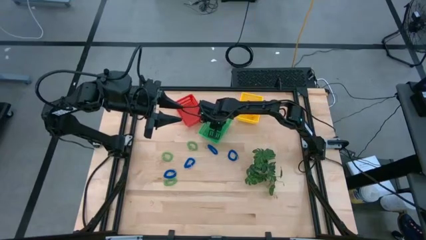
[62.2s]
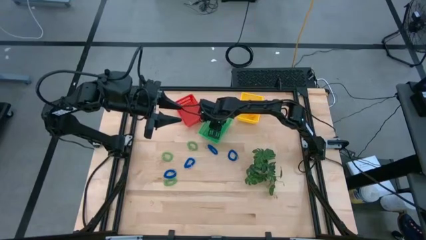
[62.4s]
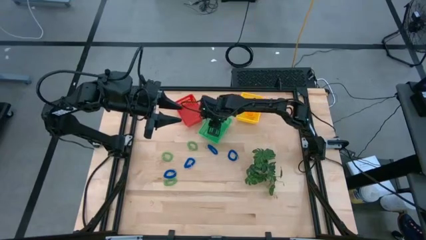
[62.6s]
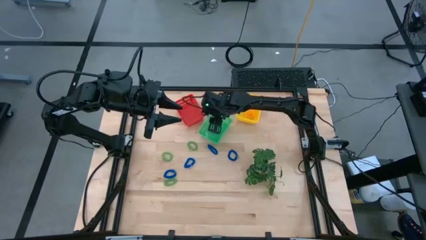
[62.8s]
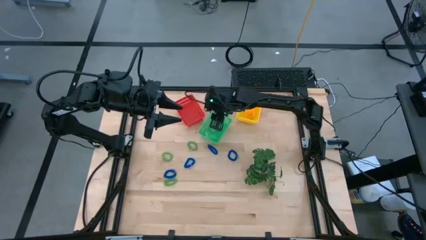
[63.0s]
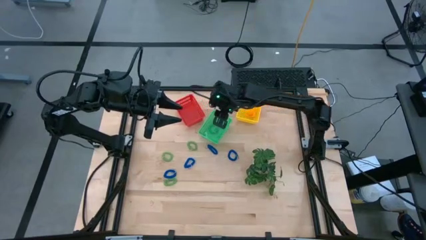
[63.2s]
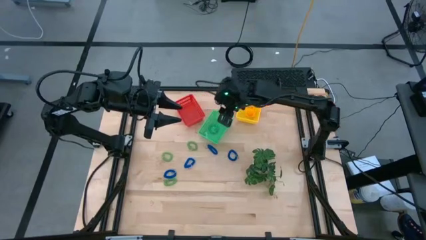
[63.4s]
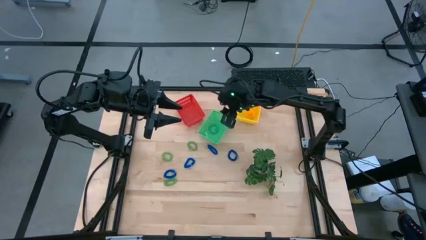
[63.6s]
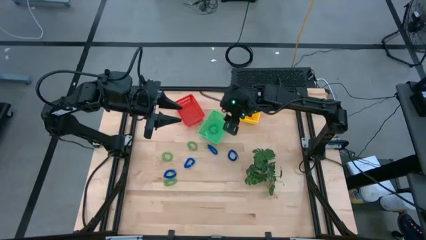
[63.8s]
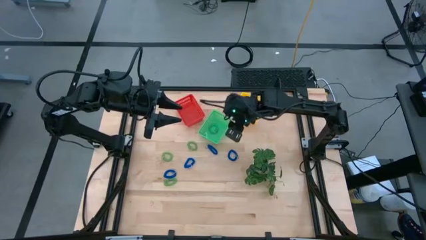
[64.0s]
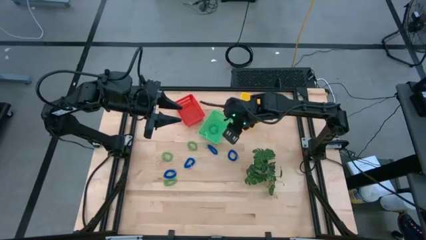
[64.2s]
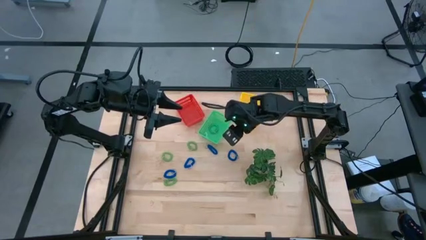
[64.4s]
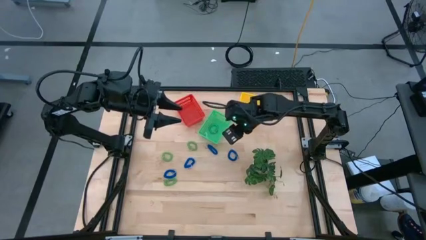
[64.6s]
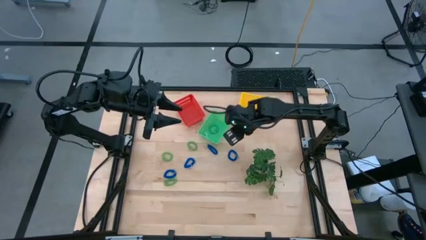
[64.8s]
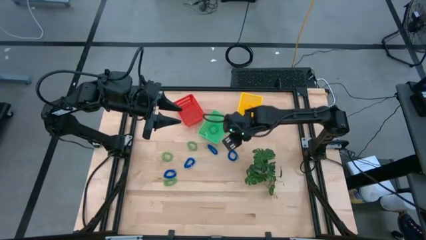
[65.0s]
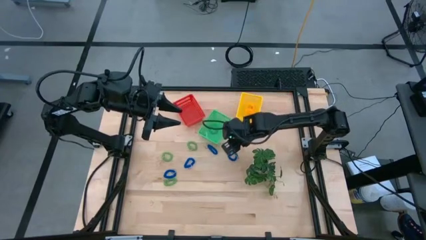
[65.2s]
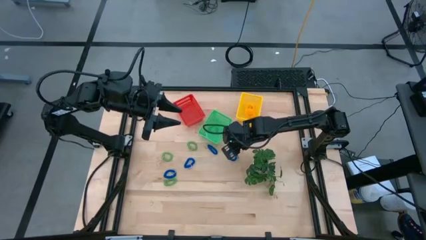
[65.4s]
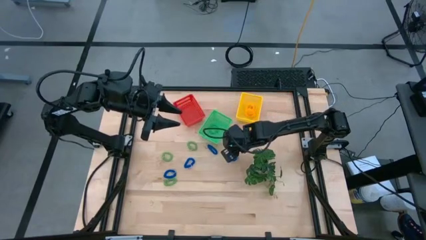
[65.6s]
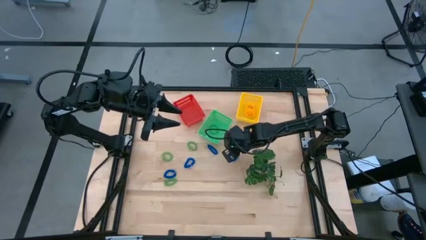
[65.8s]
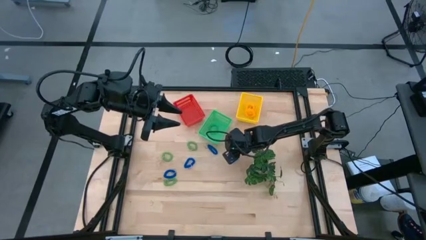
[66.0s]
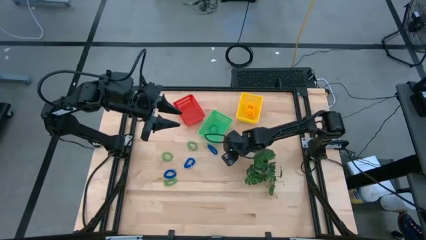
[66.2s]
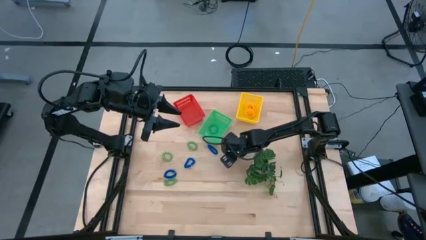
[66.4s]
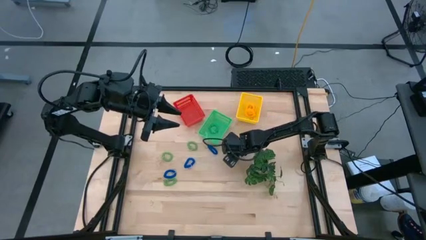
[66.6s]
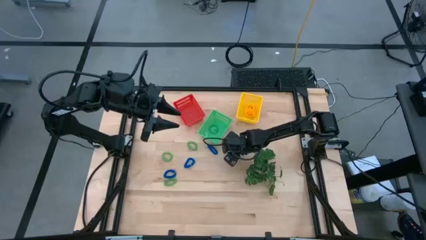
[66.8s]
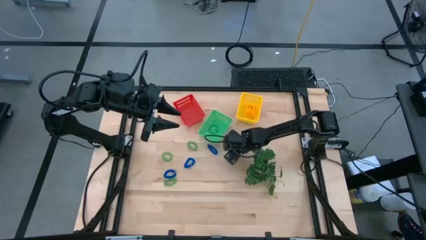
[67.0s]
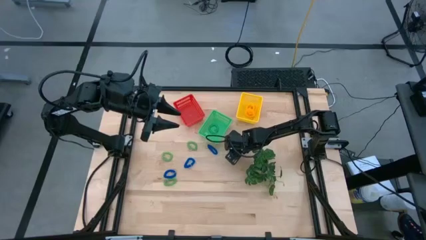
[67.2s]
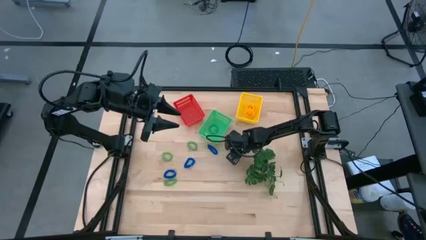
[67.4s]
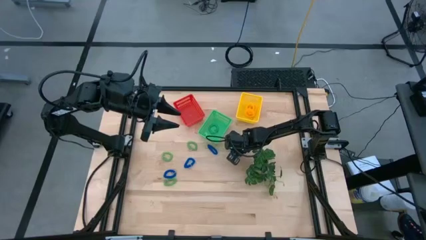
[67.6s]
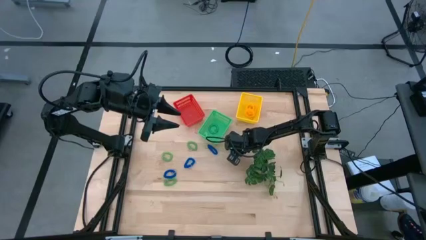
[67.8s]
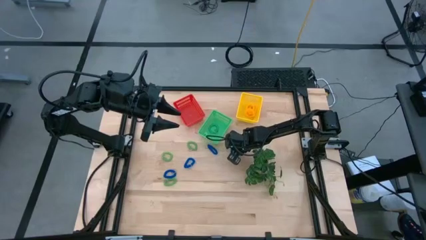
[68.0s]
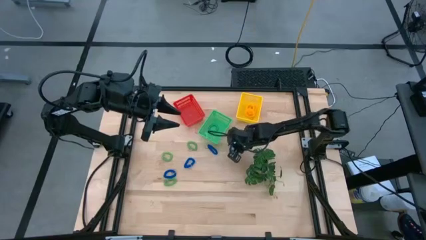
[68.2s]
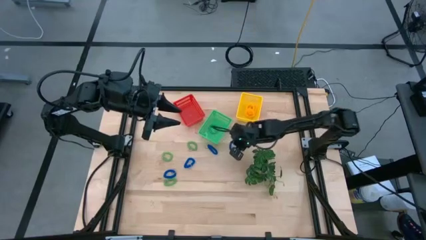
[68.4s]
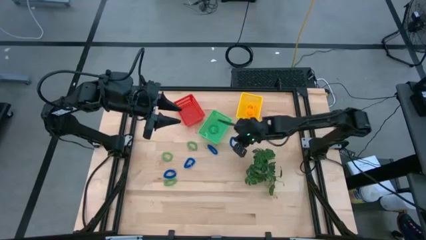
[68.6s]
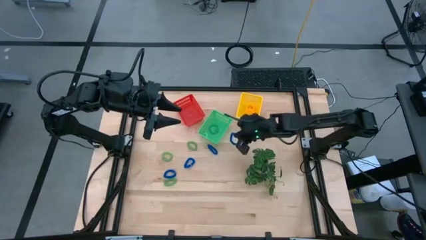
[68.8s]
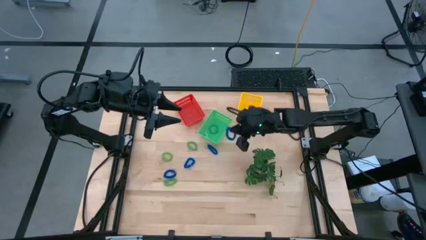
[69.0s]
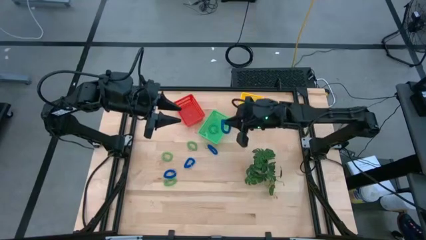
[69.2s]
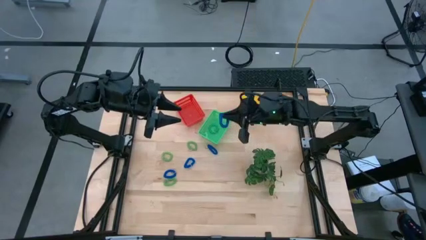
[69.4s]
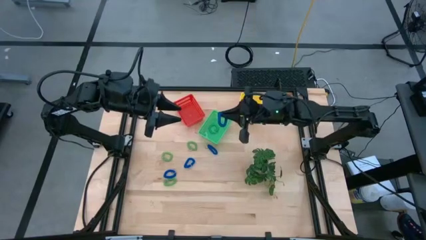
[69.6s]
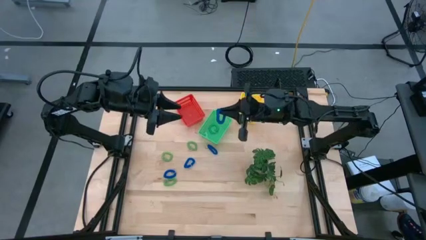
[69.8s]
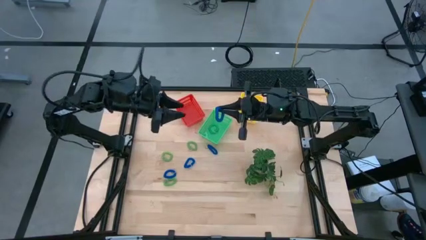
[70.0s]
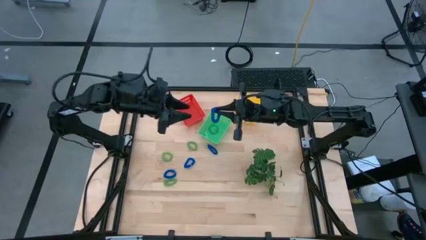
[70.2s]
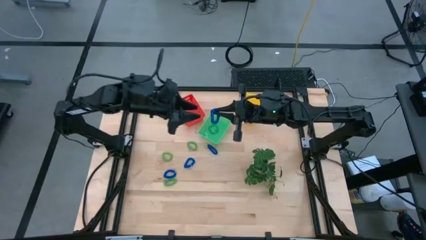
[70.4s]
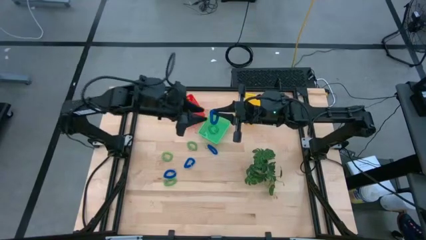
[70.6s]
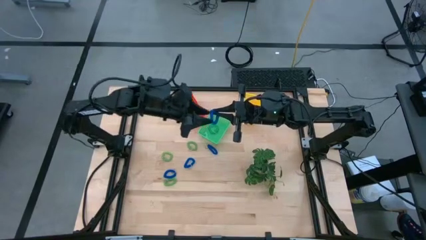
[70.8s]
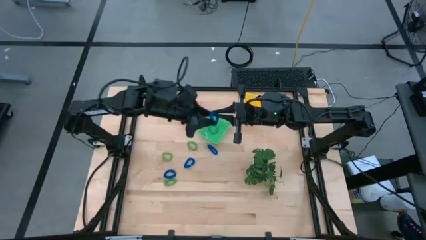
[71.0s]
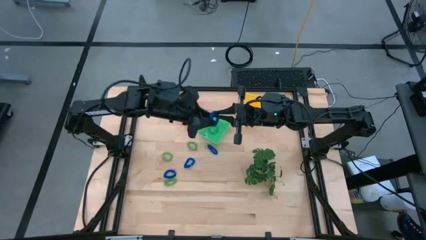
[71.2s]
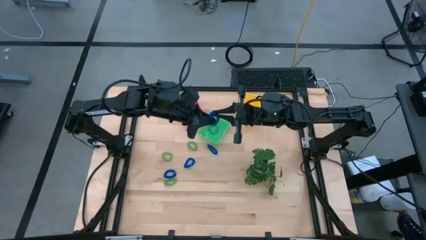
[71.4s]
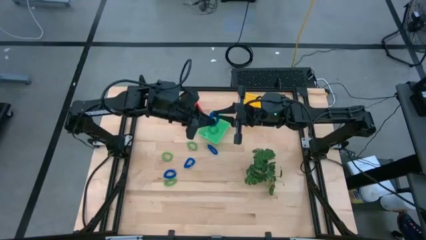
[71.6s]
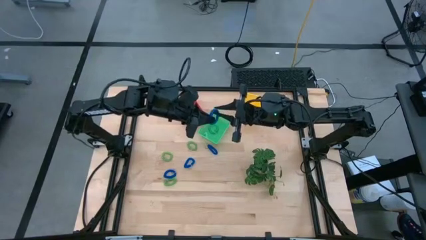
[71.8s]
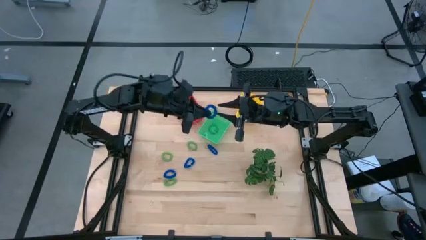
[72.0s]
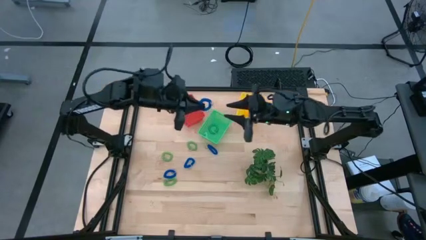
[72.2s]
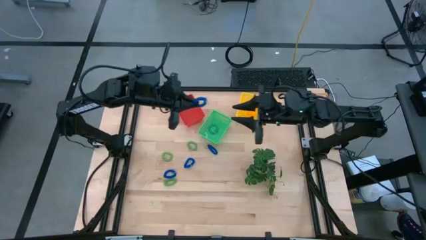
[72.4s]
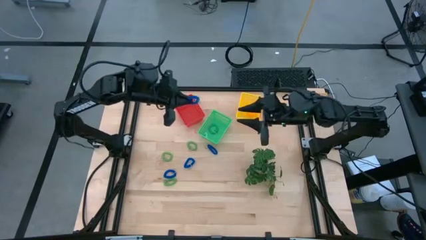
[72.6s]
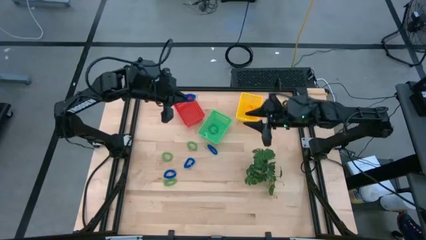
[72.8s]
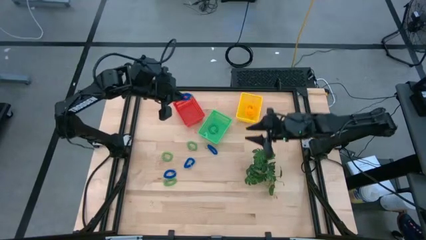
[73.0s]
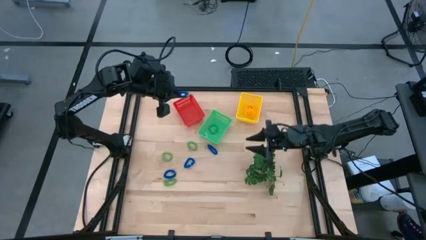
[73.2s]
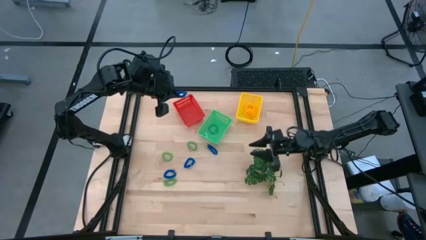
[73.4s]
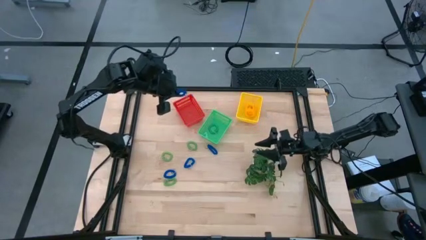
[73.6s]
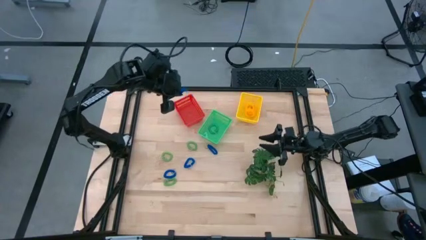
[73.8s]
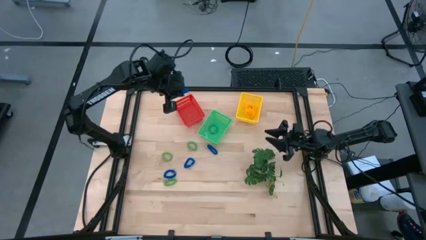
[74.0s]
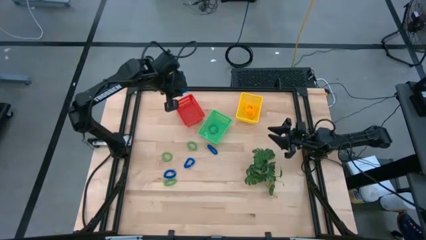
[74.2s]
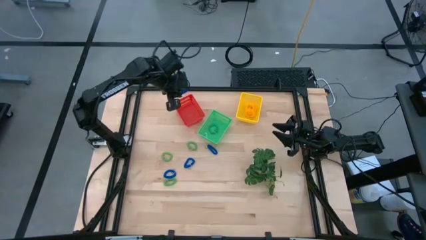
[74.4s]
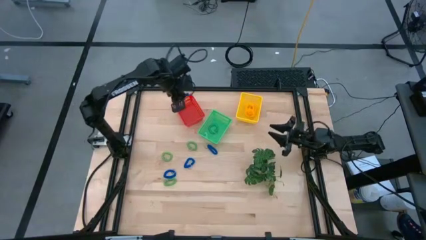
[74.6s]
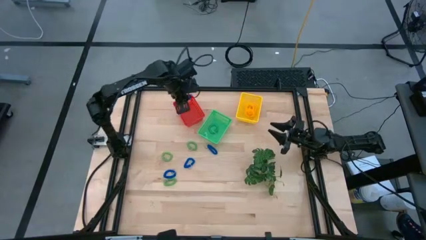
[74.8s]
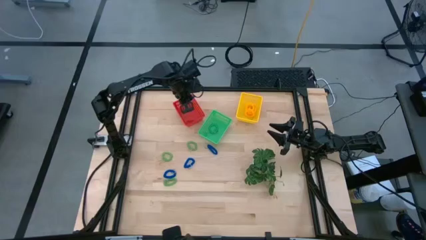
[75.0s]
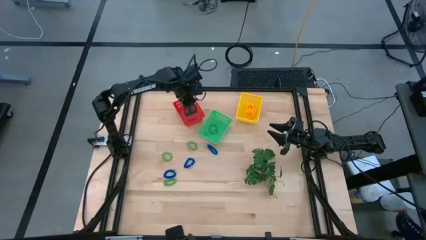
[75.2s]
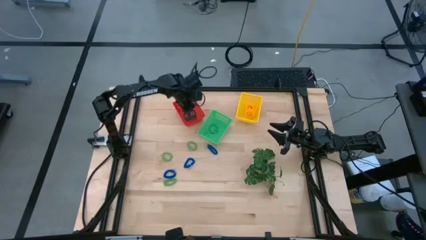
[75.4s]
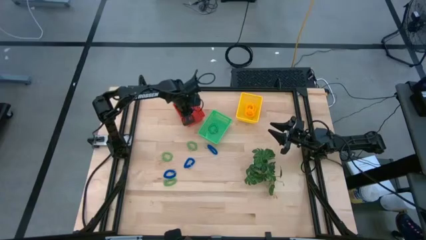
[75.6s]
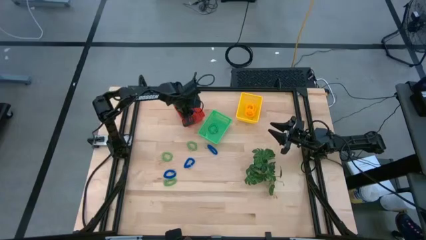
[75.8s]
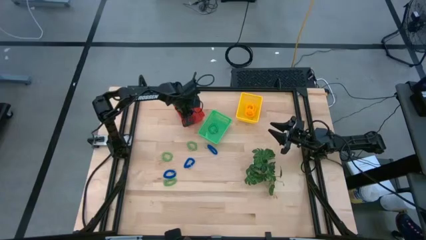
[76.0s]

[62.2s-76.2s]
Task: Sort spring keychains
Put the blue spring keychain into the red bin

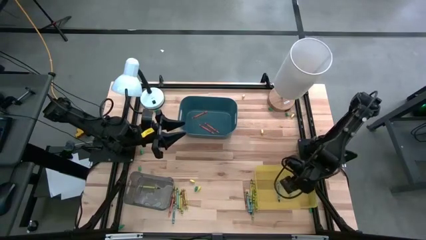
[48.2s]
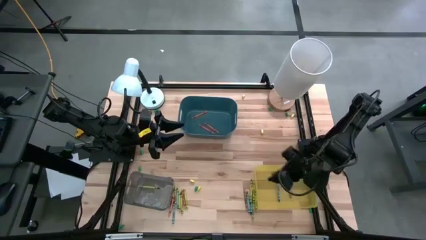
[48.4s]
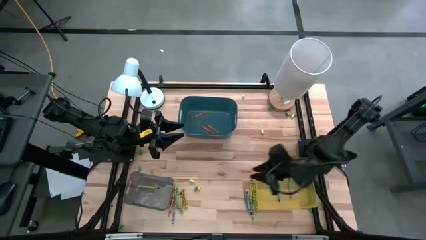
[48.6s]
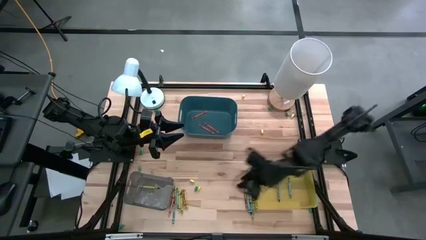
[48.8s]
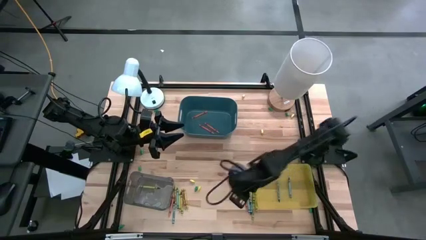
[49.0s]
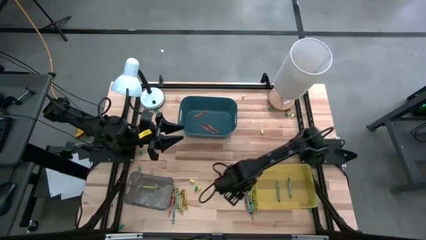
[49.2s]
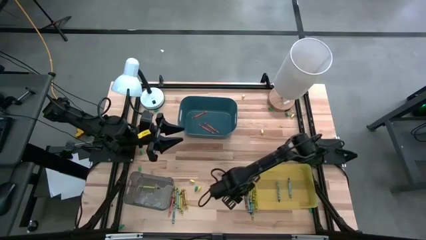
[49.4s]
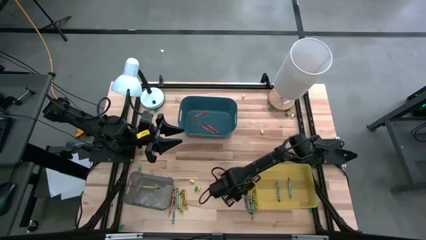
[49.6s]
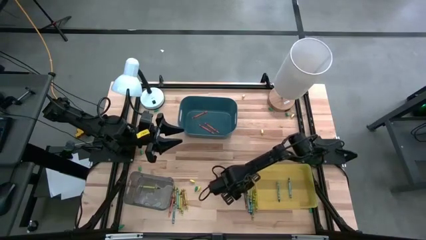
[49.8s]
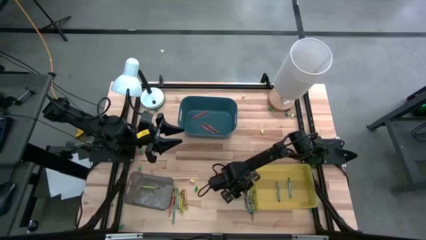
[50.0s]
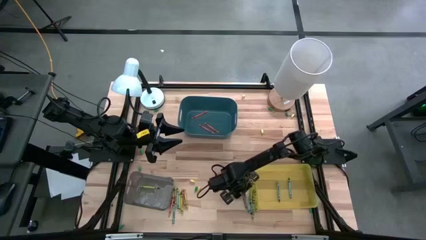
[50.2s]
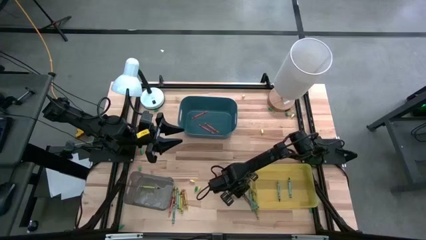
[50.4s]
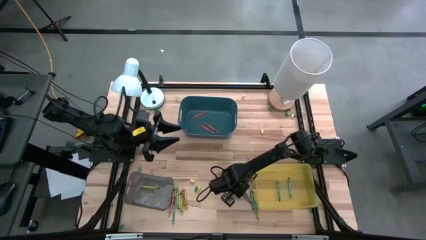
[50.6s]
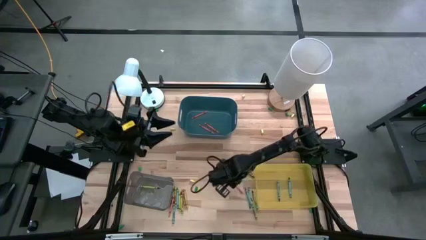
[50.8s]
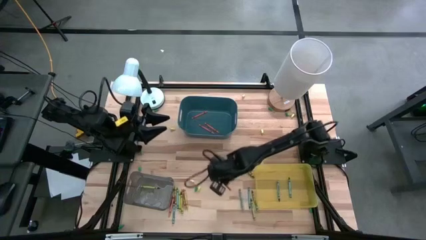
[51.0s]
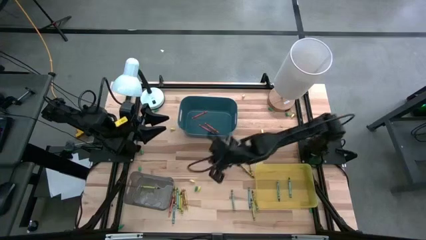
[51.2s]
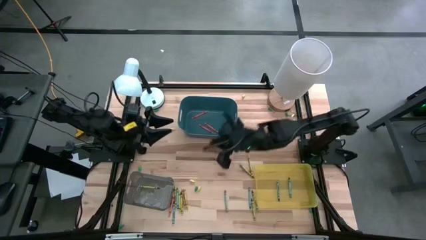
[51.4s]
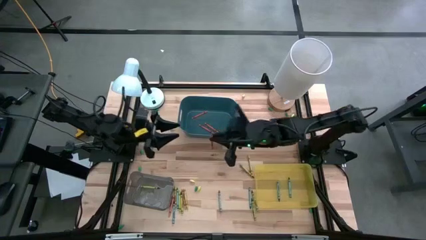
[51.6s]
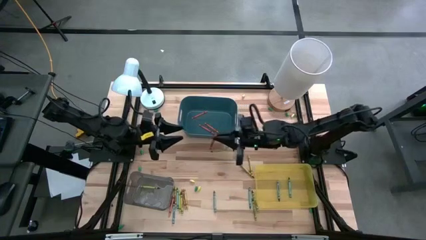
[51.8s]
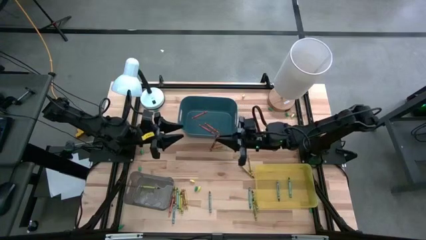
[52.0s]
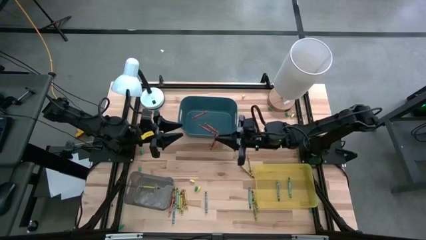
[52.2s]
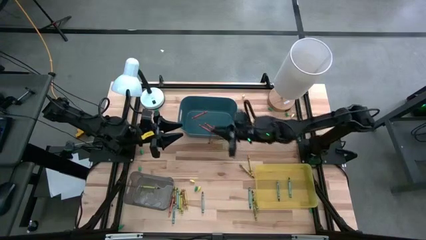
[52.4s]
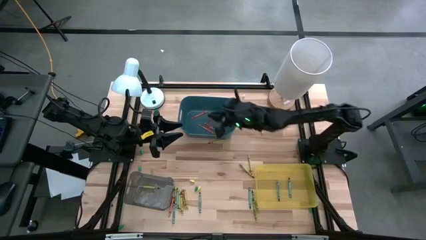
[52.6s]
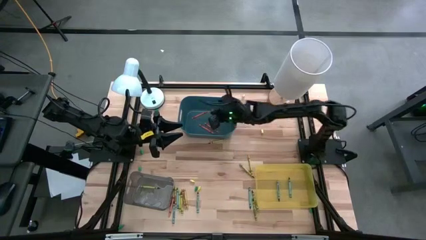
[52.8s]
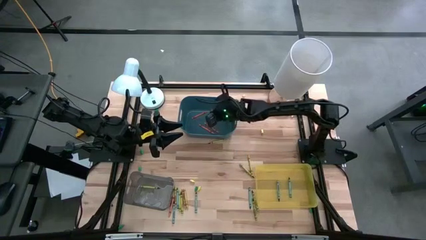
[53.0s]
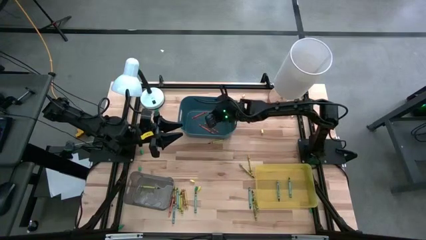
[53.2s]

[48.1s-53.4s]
Task: Sort crayons
Put the right orange crayon into the blue bin
